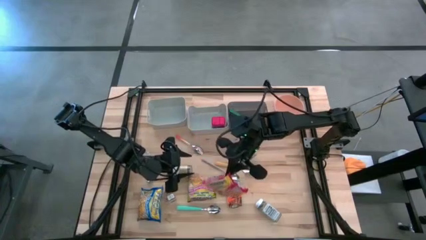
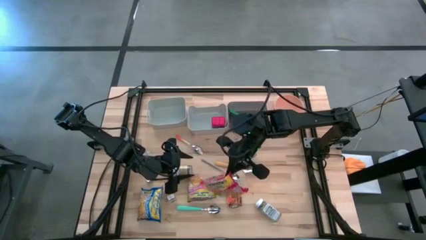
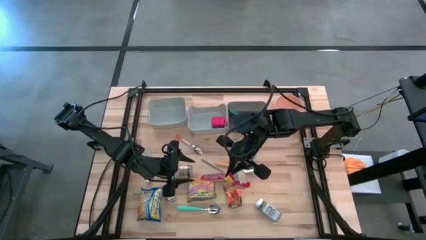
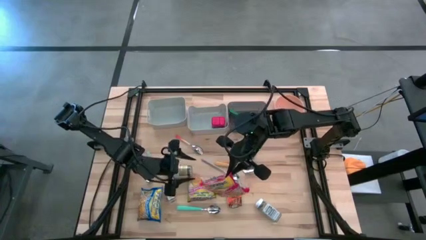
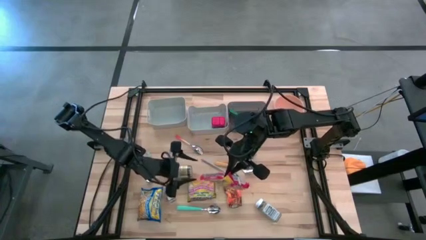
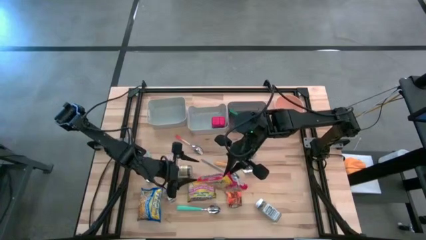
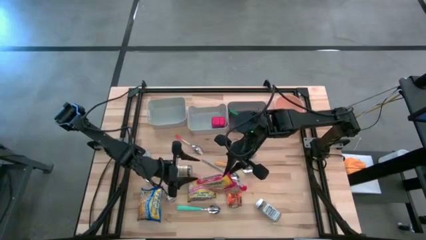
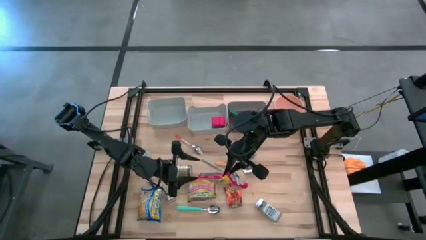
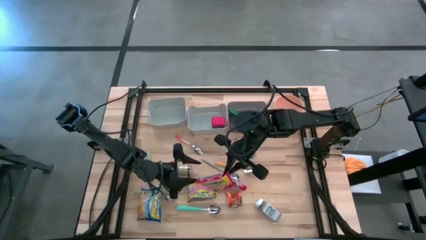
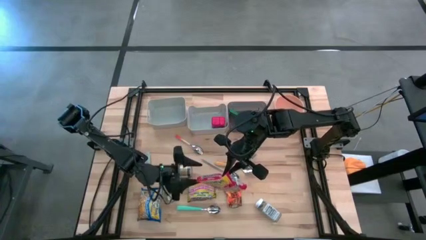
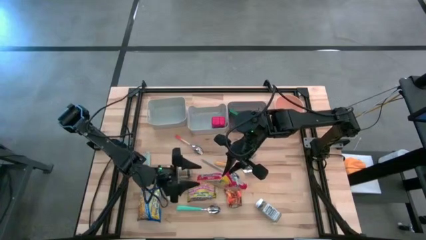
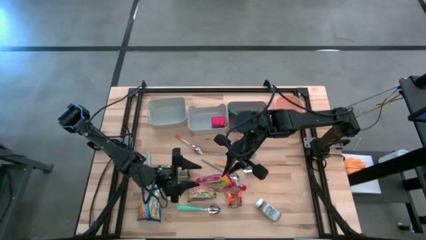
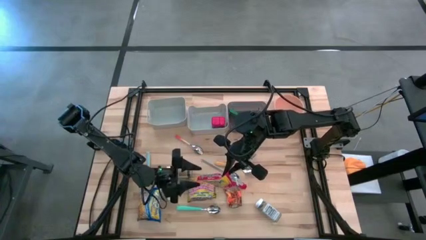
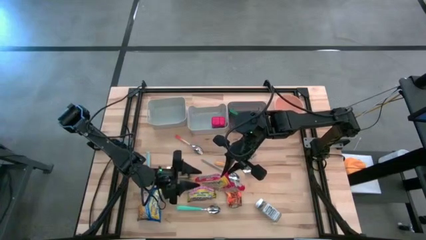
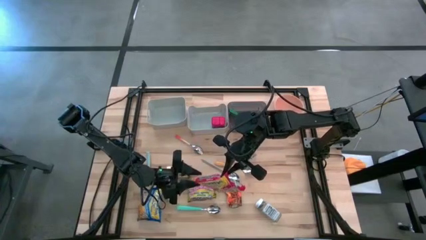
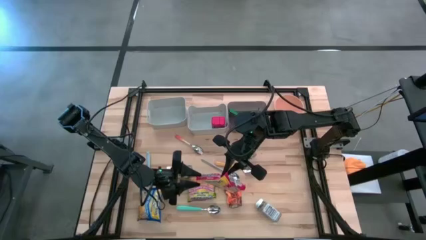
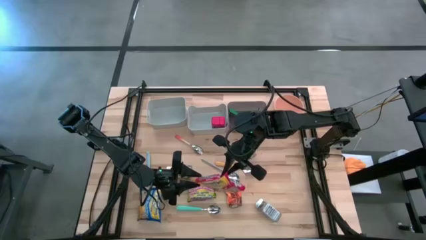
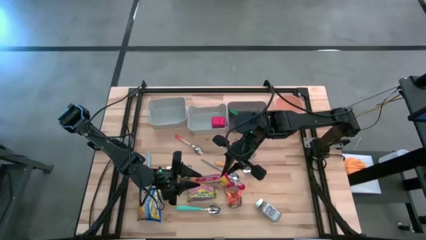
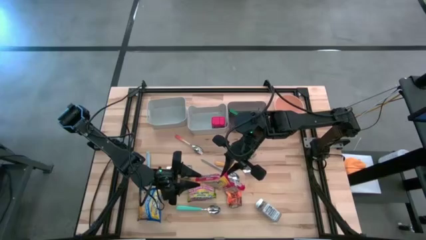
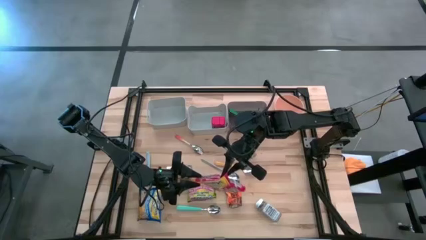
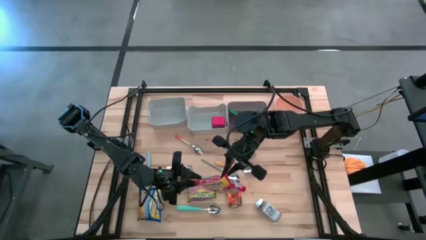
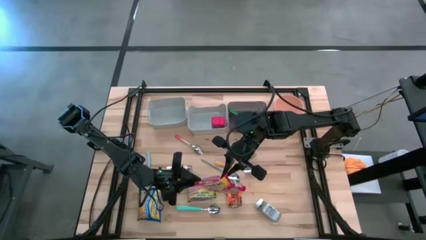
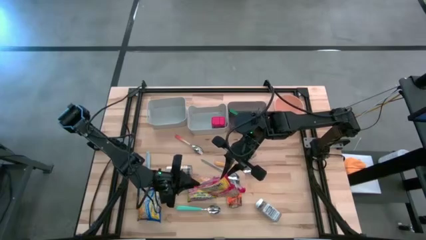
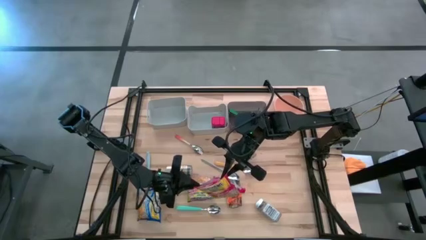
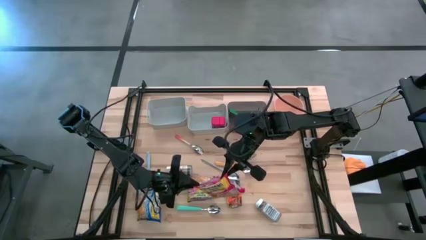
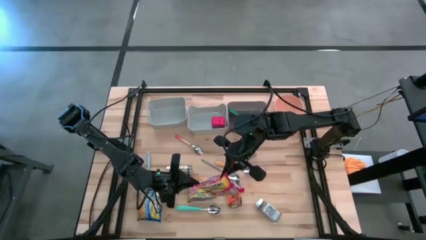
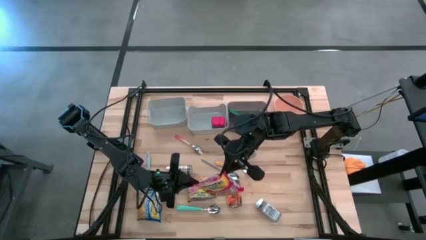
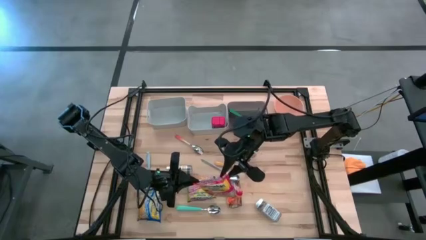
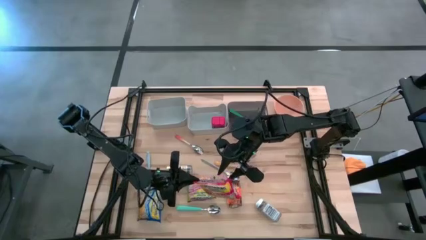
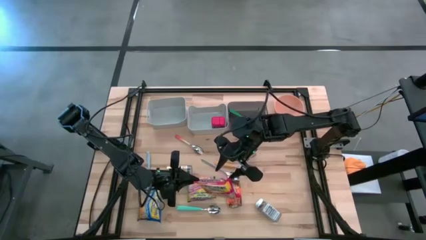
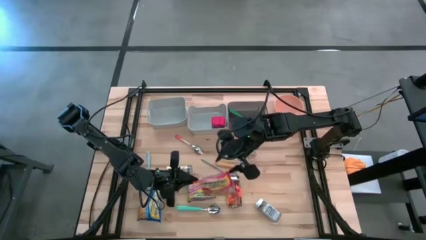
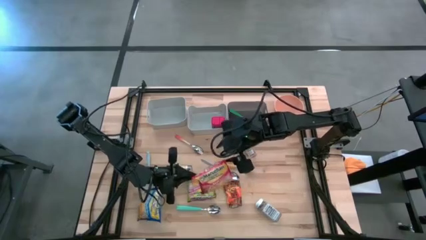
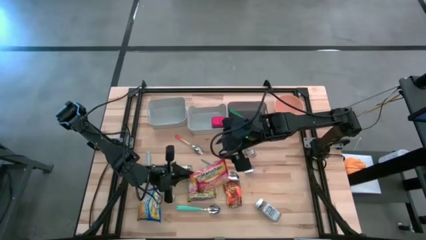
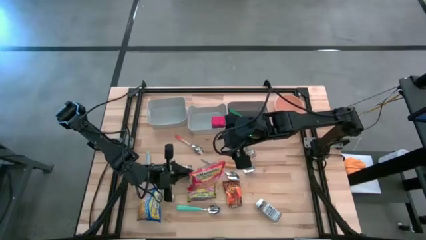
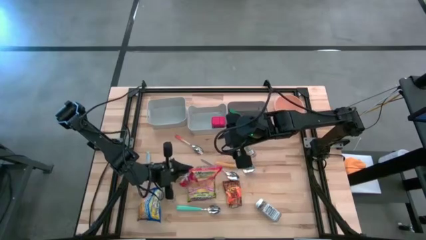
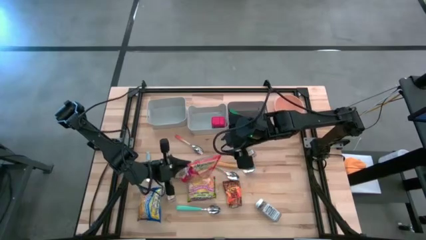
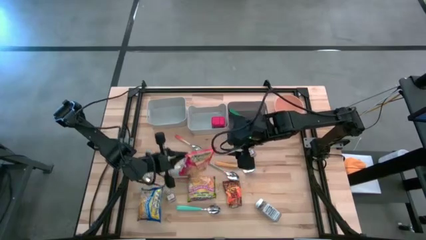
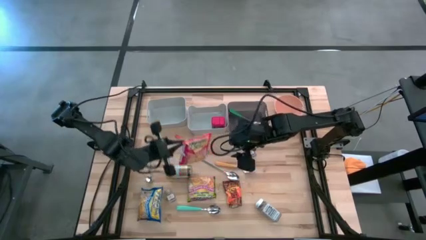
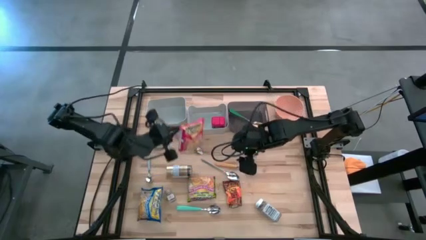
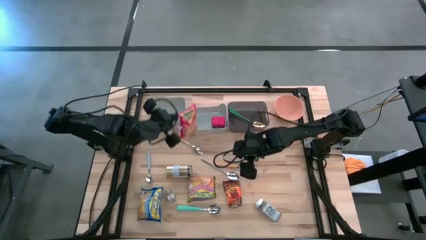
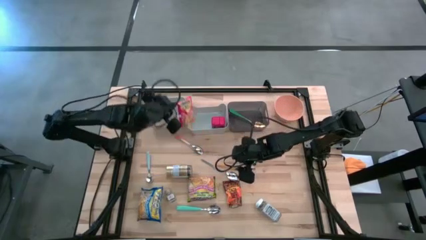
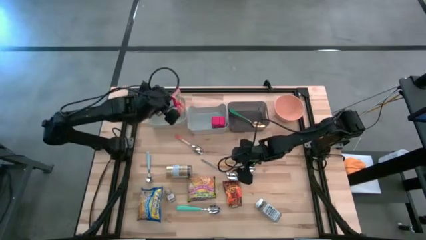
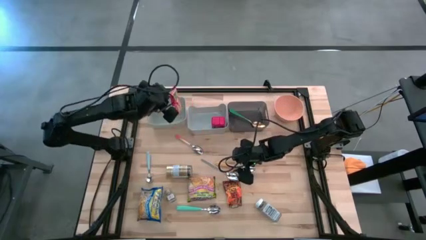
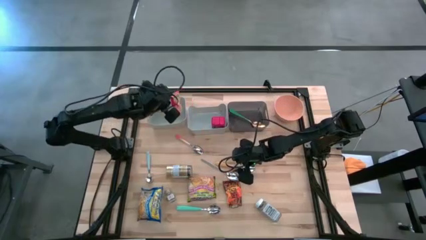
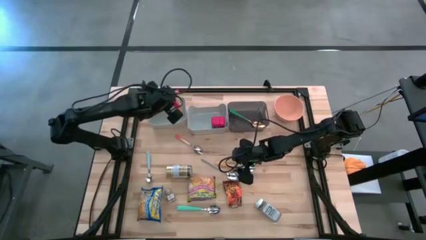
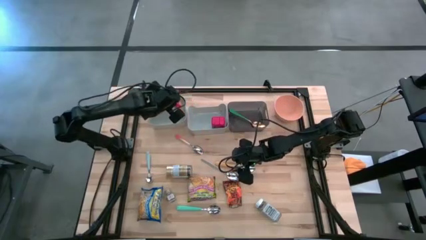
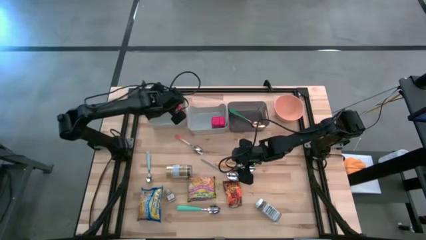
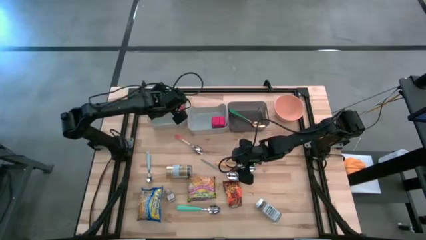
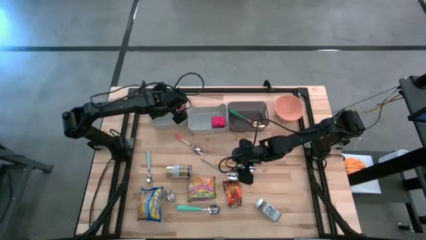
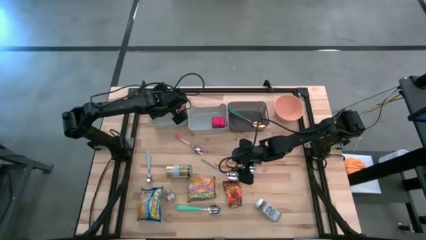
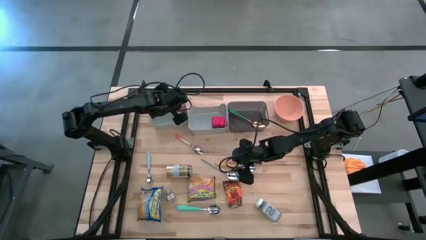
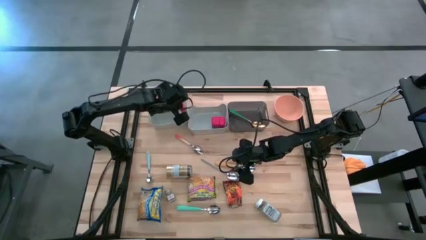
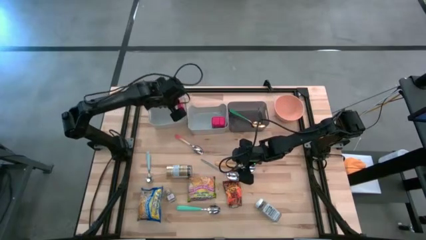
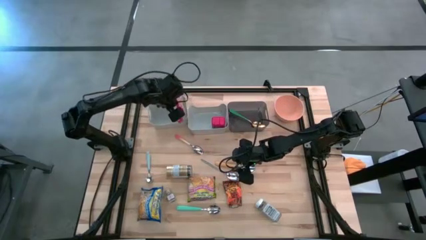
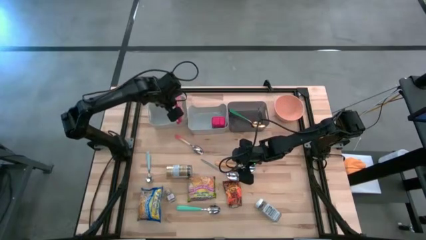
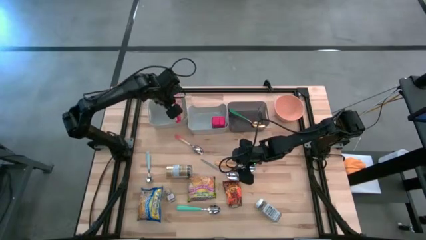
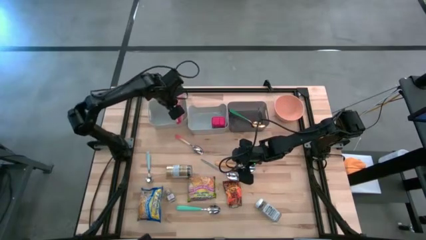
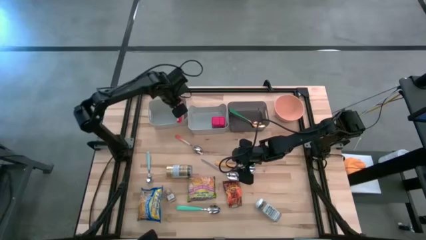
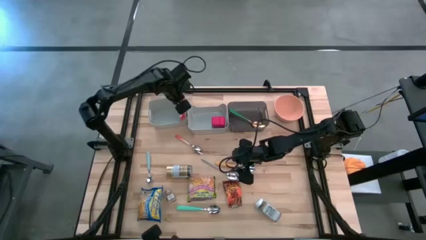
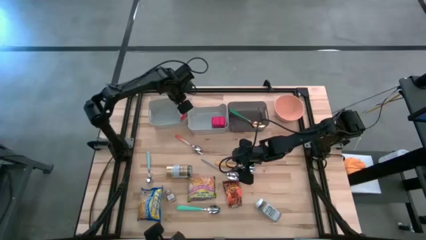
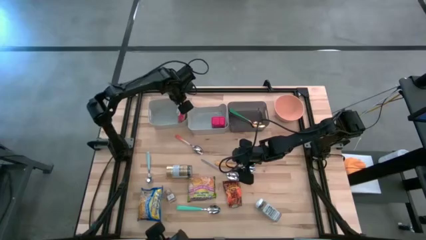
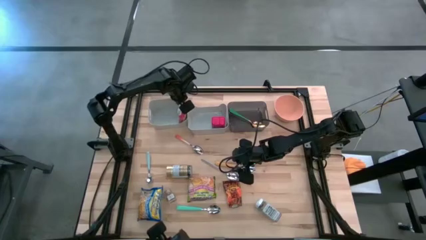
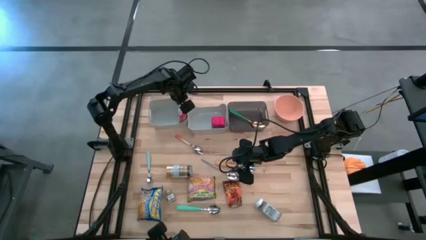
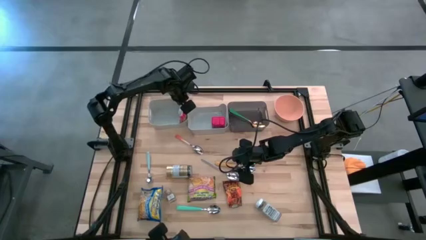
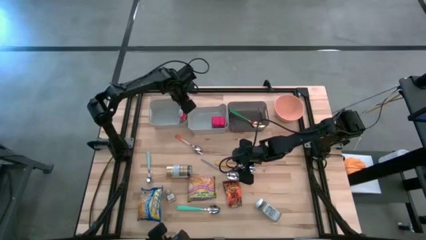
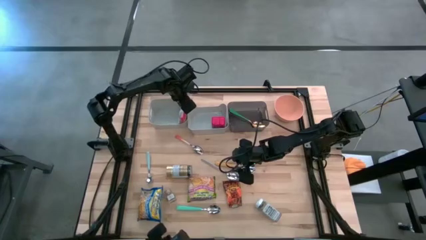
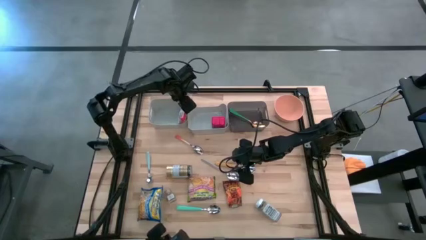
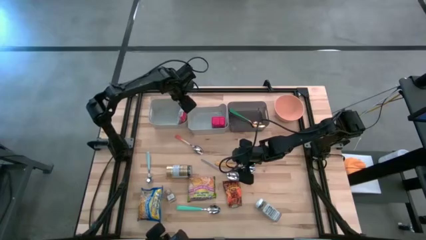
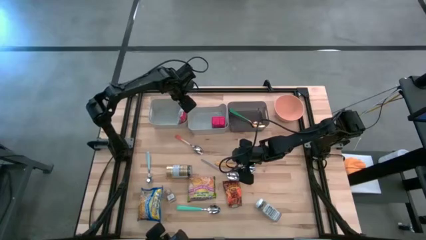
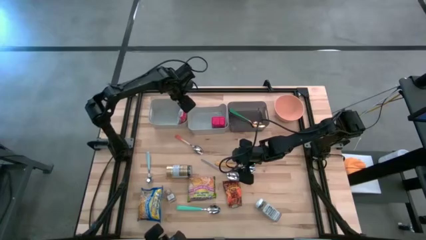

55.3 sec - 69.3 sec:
Put the red noodle pack into the left gray bin
